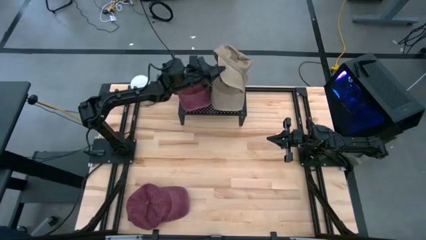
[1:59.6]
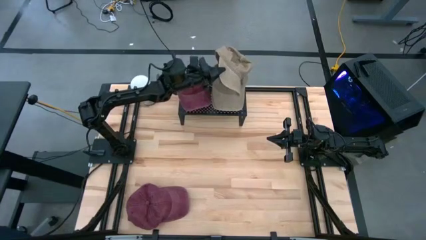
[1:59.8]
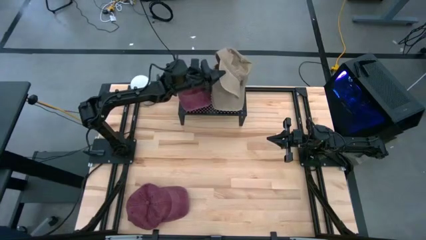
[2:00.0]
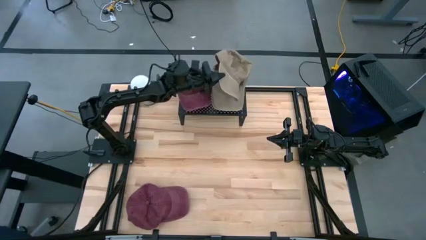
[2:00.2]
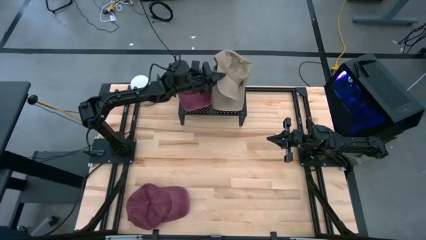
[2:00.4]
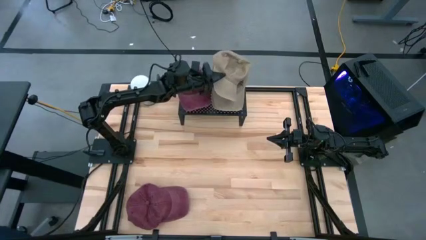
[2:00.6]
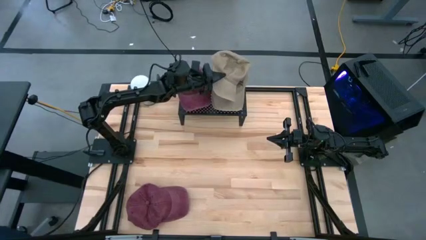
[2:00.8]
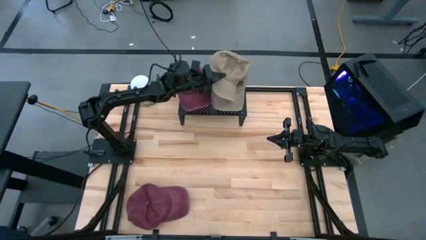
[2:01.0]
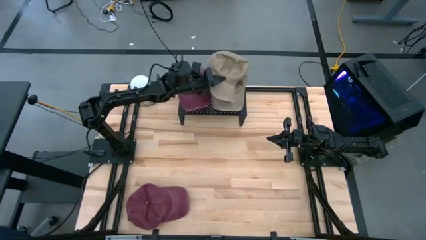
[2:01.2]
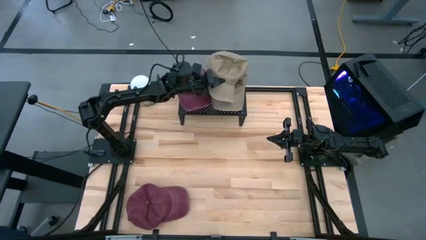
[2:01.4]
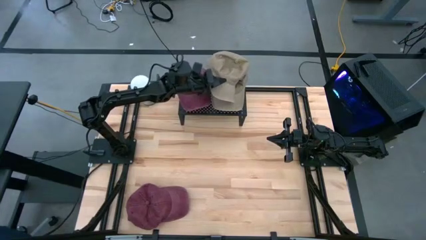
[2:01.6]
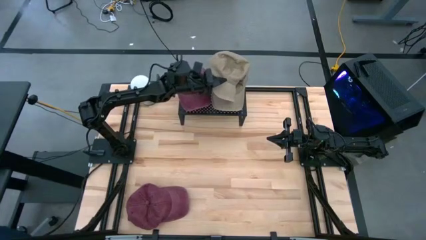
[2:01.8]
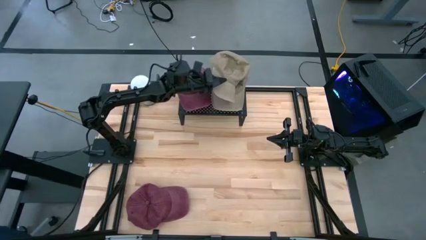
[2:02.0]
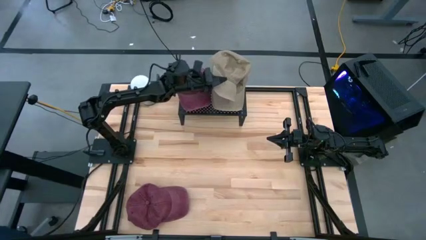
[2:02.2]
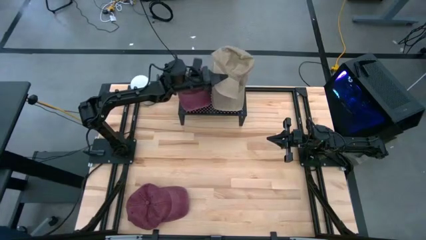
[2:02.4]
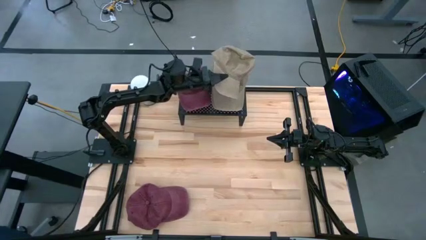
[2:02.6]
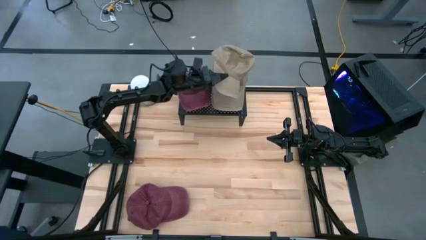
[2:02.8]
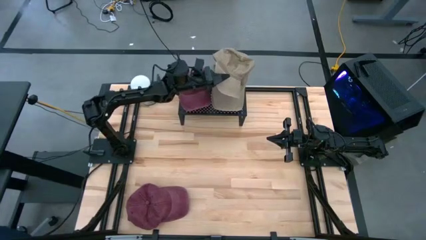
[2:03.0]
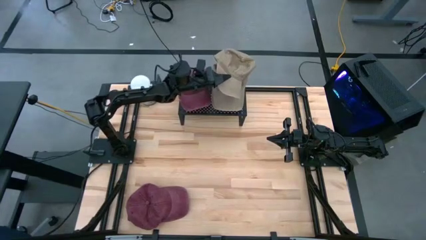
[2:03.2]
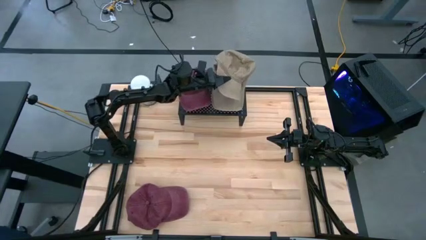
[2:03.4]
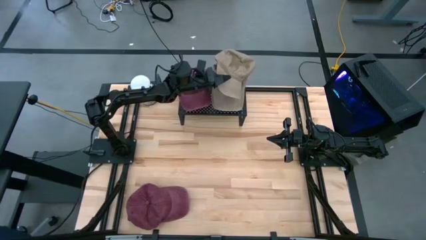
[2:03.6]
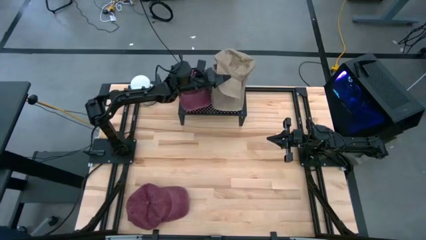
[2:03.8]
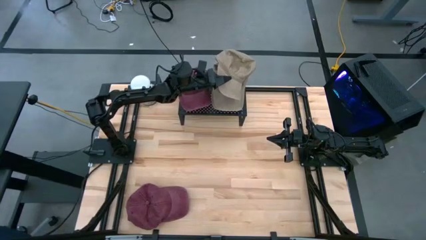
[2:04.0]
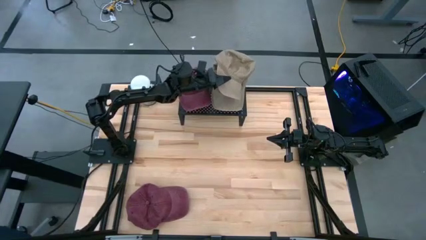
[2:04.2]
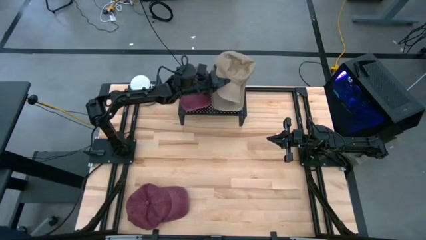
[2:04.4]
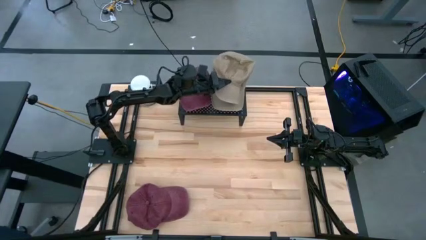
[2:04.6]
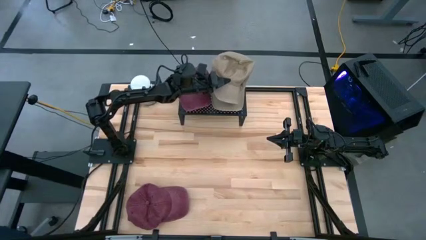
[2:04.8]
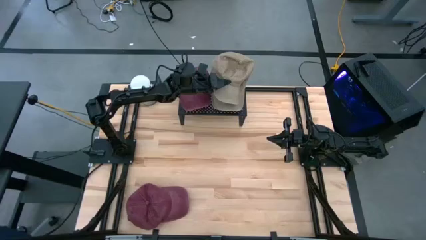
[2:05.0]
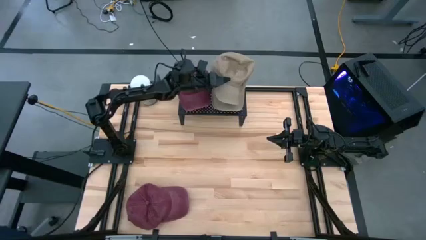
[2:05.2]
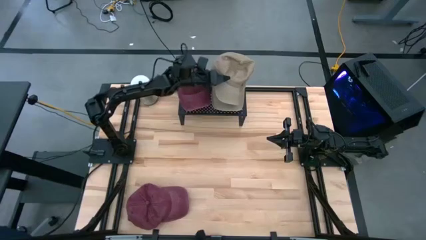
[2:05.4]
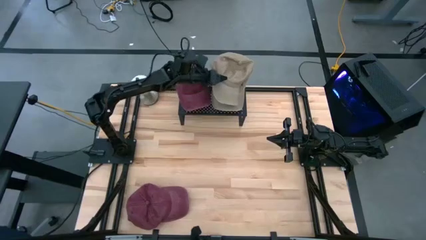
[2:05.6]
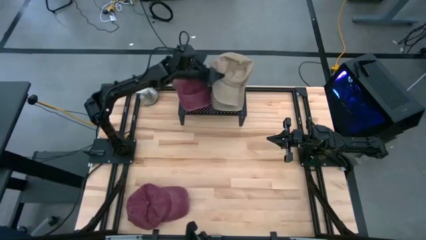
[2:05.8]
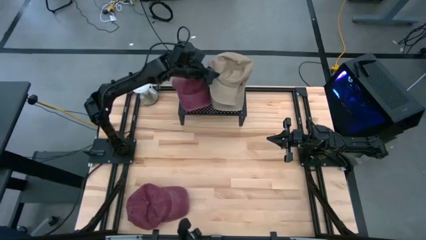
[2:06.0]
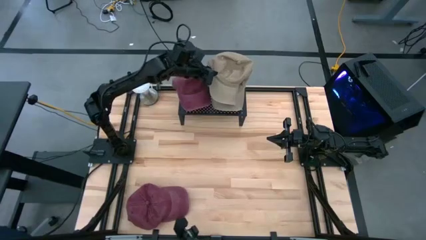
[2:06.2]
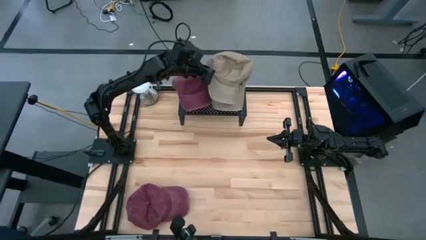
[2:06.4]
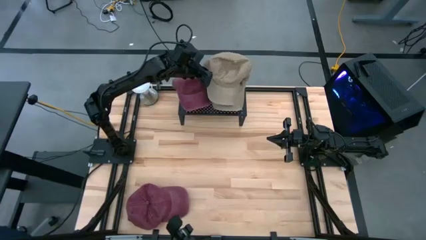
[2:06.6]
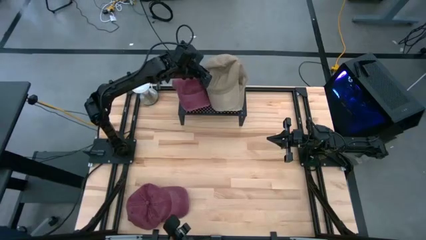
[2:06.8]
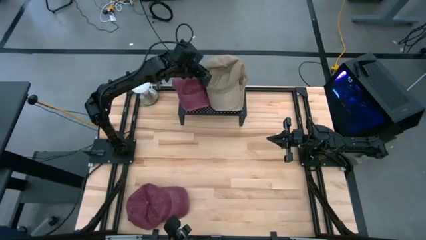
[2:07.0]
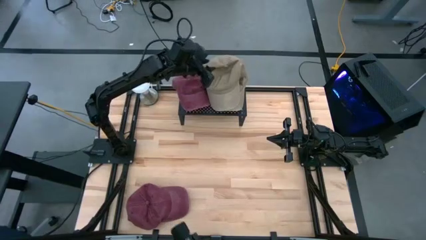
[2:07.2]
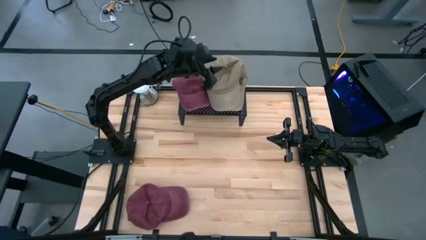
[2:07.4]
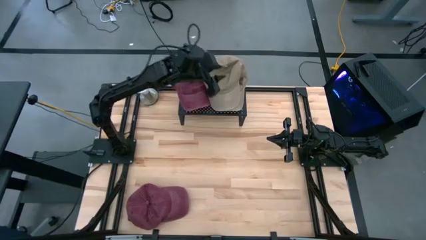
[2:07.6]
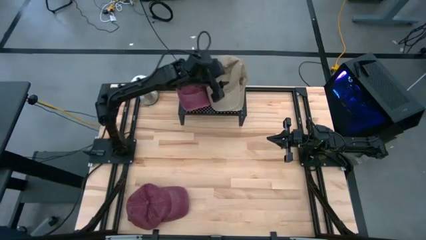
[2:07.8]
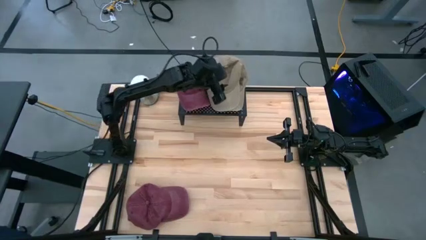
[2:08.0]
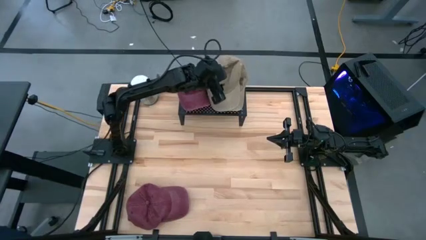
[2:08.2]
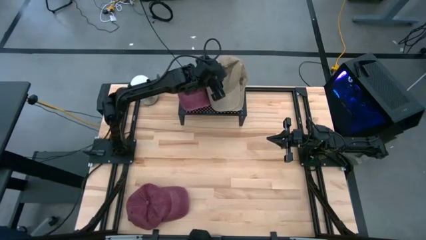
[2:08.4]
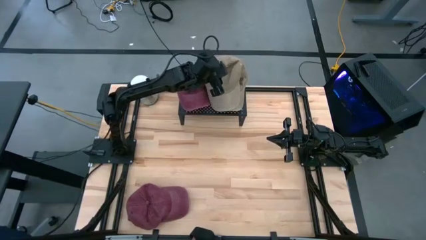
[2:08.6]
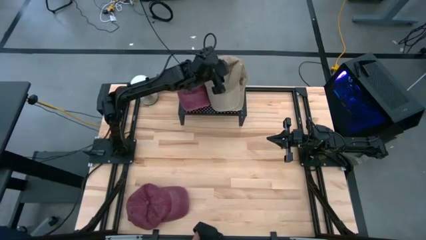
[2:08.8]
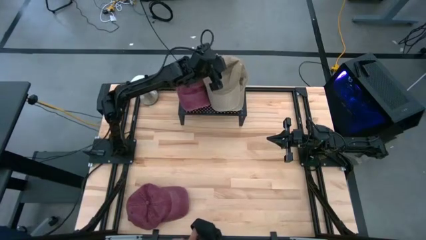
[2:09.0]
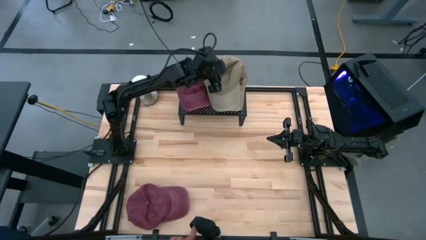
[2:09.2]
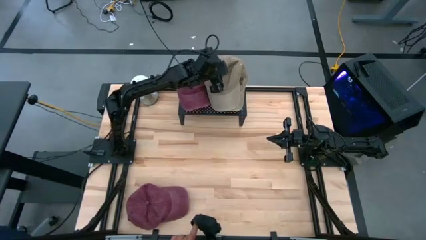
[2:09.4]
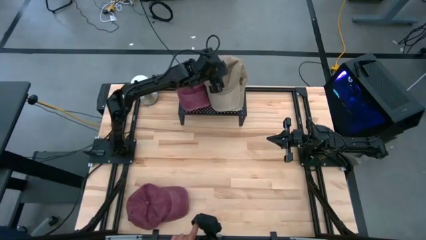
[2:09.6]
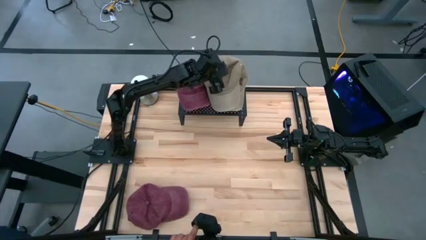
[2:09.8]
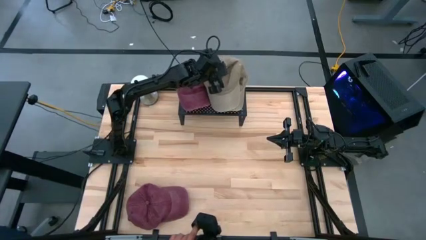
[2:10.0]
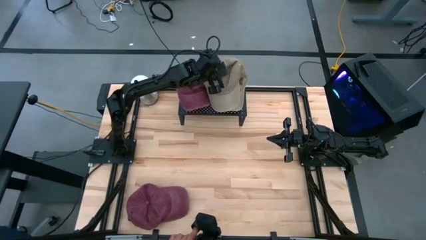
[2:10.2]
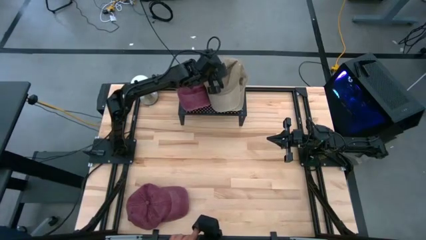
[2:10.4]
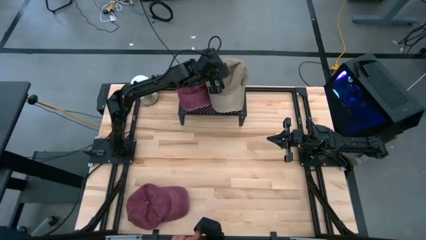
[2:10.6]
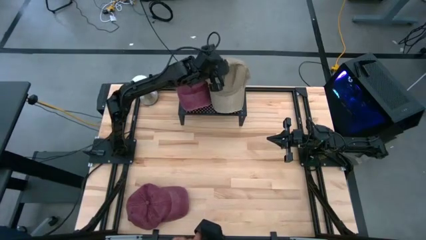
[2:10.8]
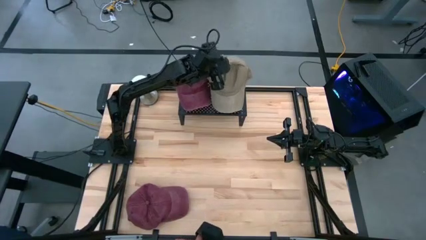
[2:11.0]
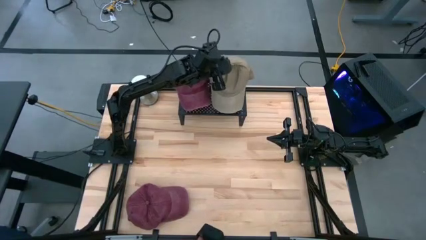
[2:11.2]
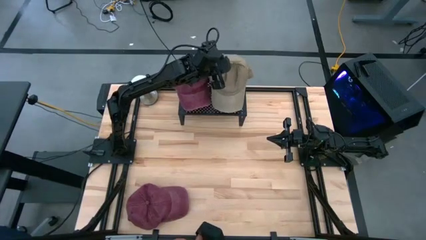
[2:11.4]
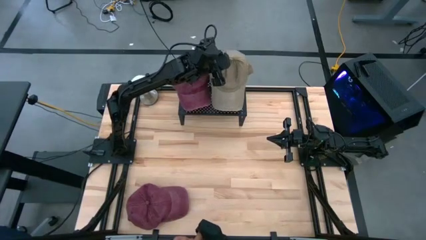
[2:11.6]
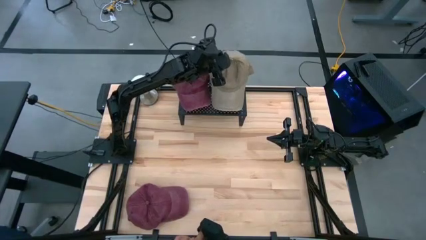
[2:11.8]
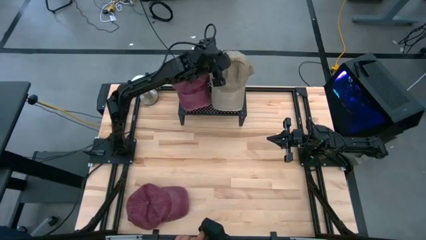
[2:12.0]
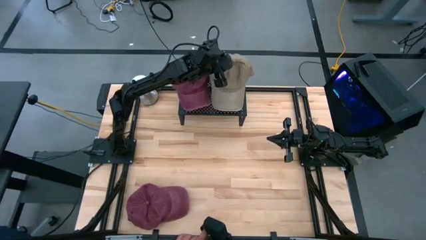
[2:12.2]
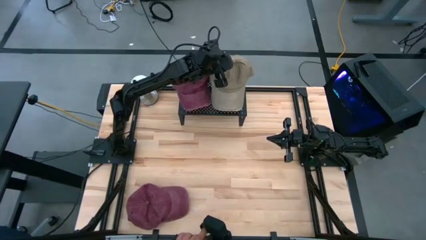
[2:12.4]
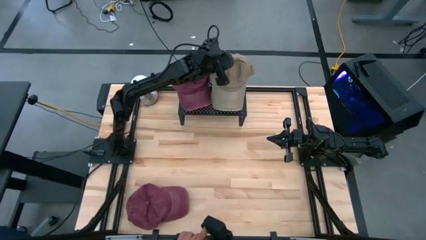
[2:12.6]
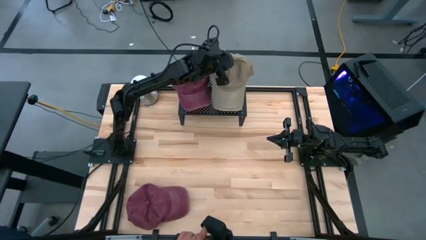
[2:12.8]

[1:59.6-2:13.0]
Task: Pick & Place hat
Stack the brown cap on the brown cap on the shelf

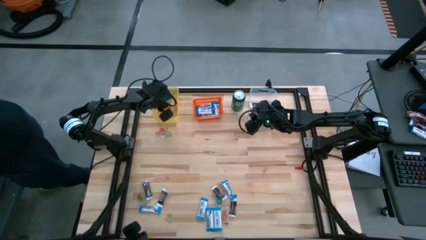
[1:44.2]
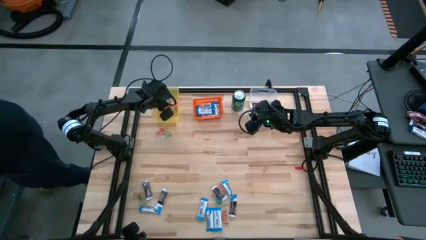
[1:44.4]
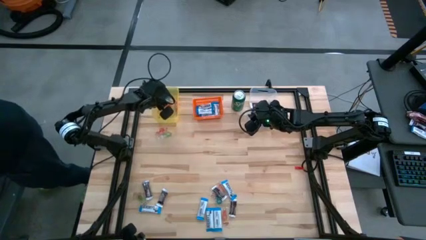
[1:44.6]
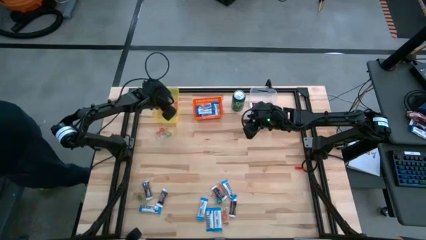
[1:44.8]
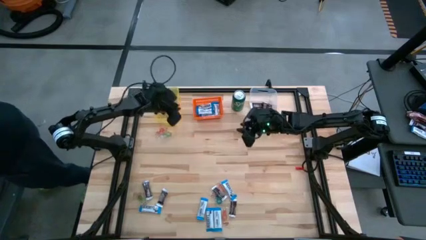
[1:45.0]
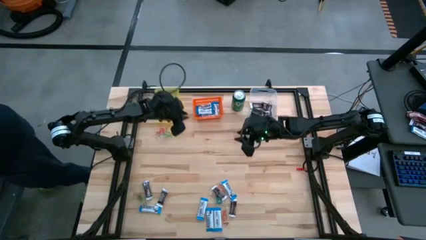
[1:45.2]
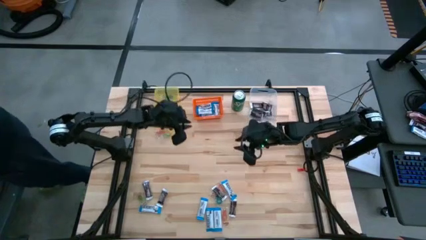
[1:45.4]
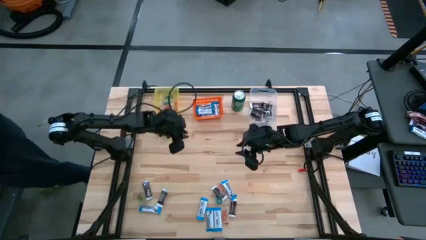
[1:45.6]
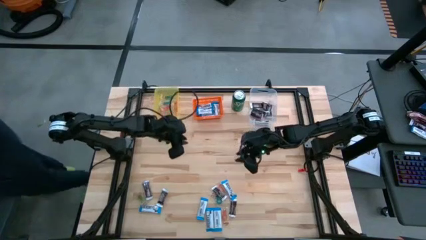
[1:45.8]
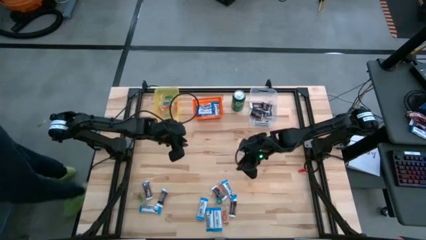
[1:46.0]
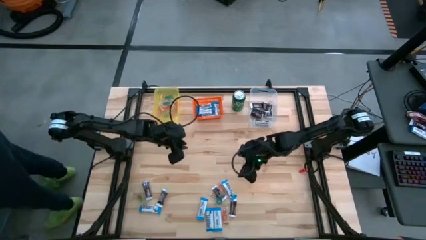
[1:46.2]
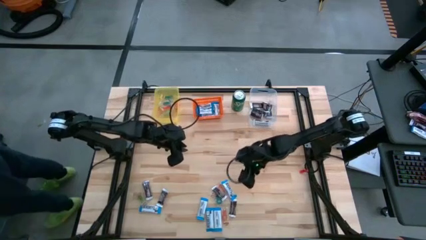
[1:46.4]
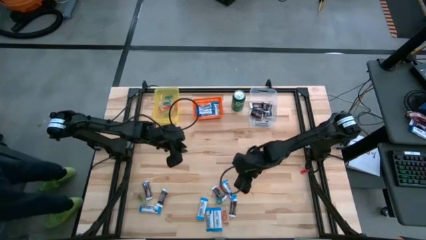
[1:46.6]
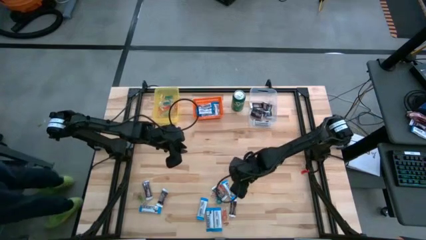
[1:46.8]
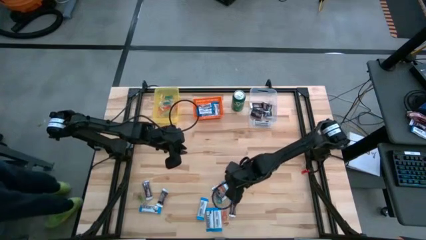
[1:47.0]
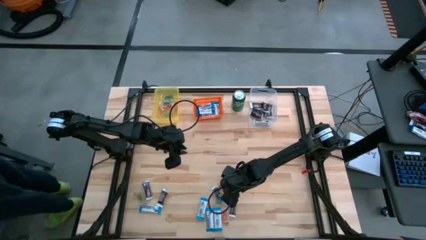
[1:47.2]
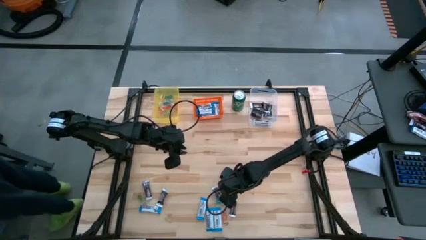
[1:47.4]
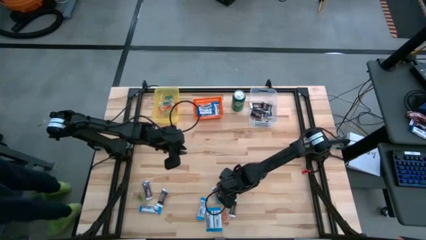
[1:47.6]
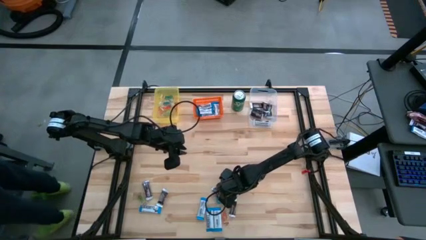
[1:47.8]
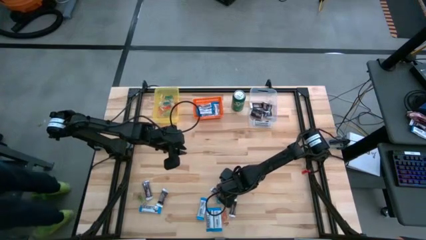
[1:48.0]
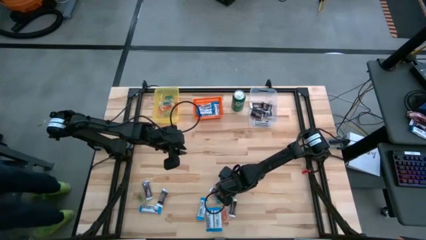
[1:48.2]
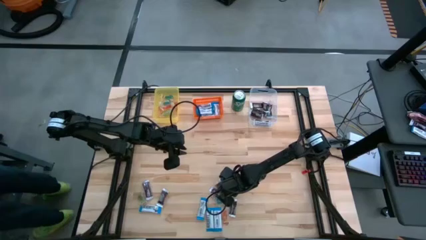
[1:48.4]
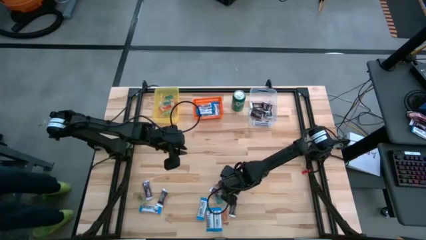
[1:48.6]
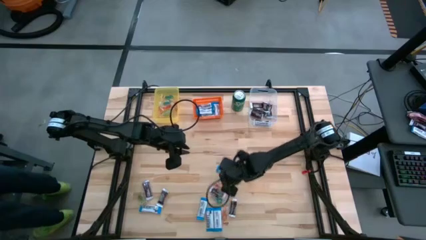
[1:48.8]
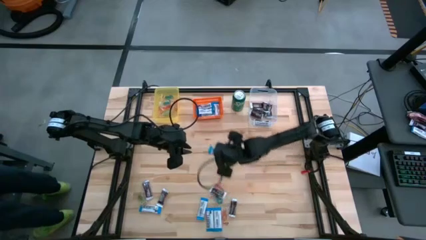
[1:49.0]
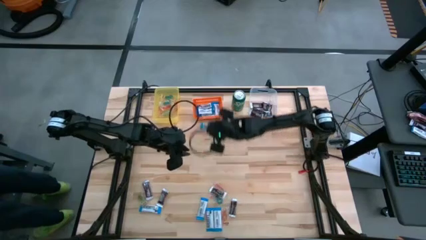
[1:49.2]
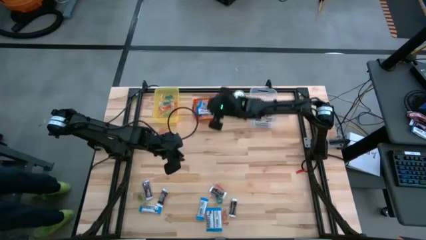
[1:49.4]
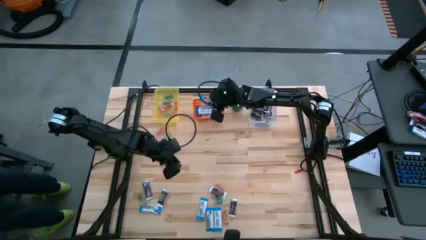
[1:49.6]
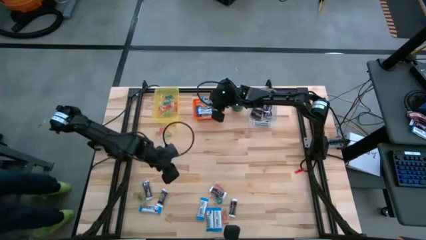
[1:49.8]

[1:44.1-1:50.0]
Task: Organize candy in baskets
Put the white chocolate into the orange bin
